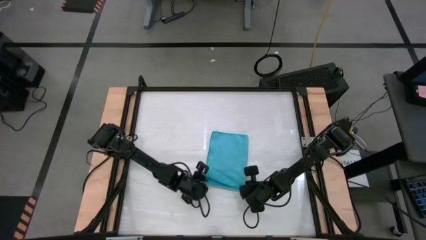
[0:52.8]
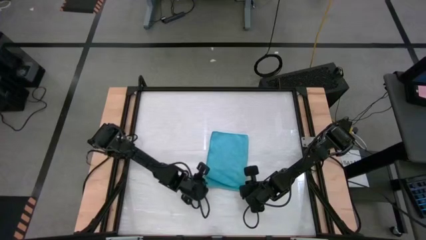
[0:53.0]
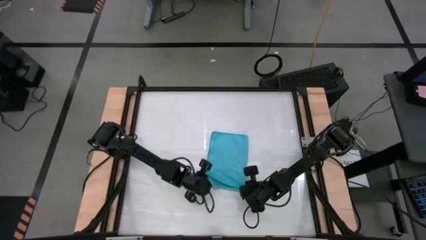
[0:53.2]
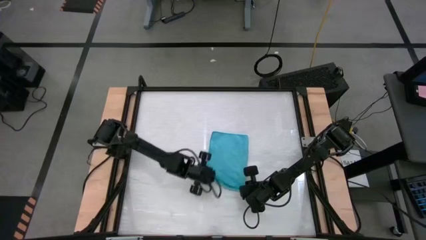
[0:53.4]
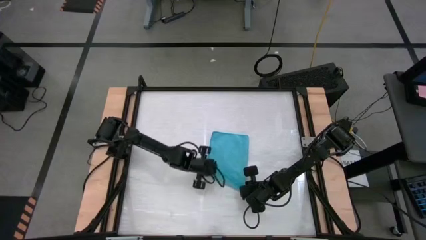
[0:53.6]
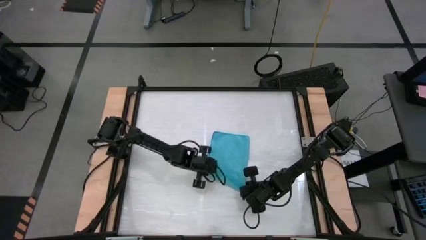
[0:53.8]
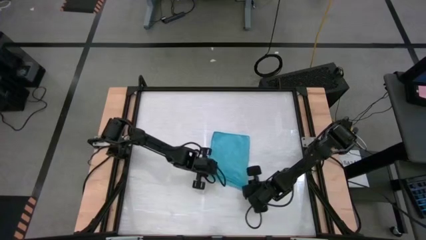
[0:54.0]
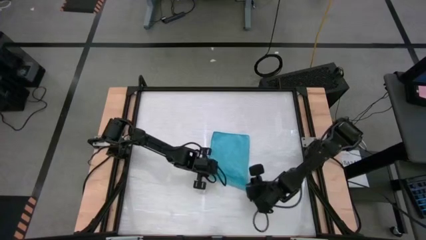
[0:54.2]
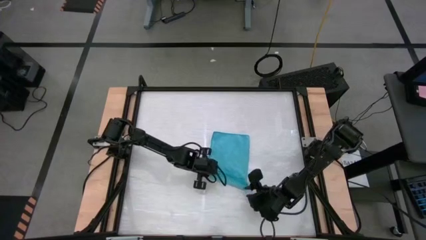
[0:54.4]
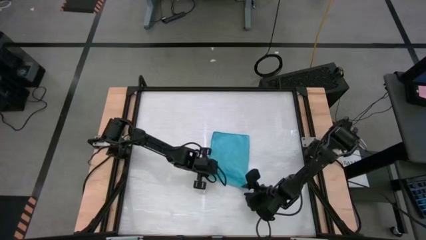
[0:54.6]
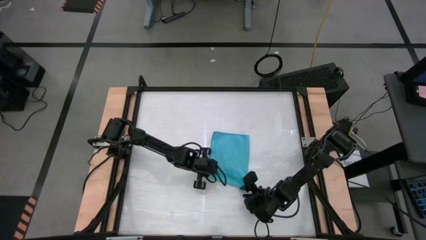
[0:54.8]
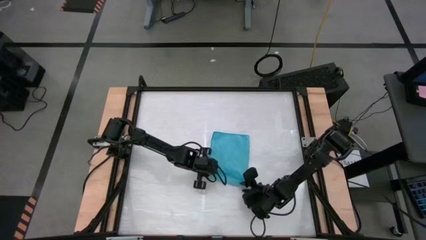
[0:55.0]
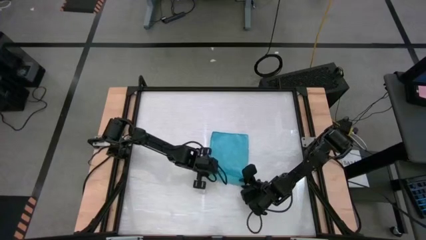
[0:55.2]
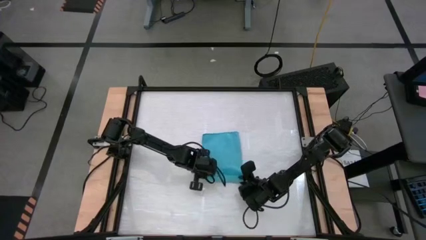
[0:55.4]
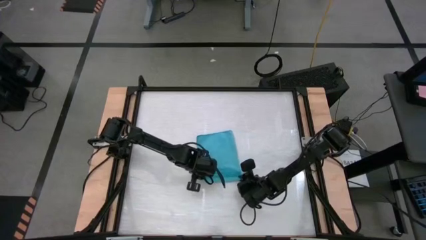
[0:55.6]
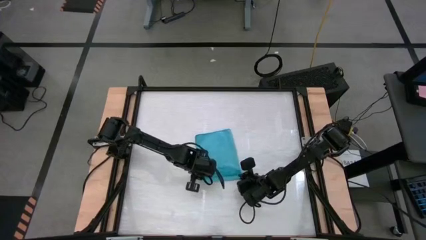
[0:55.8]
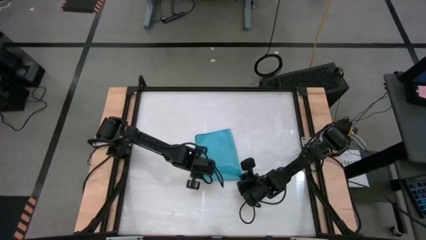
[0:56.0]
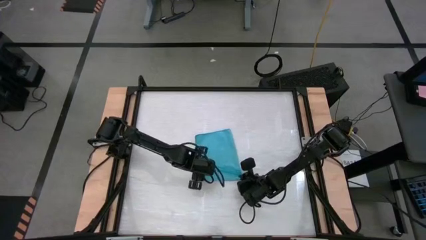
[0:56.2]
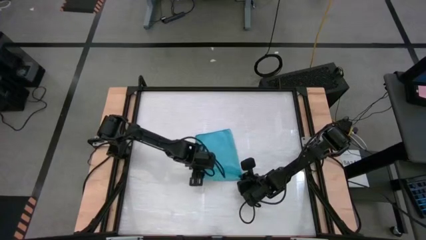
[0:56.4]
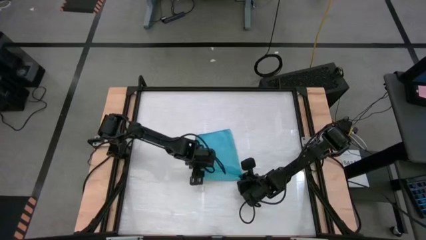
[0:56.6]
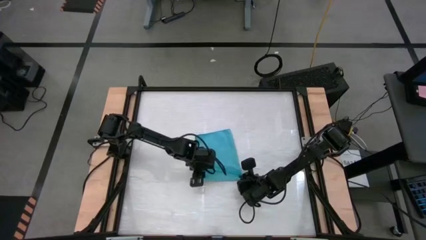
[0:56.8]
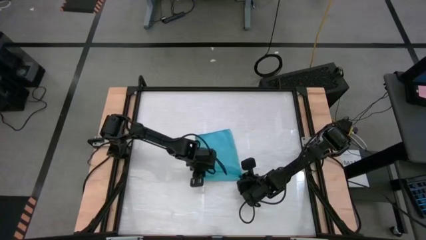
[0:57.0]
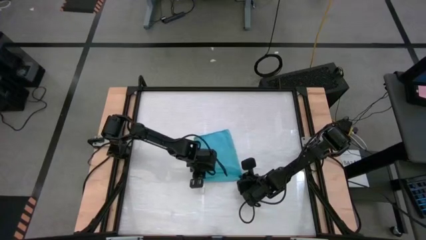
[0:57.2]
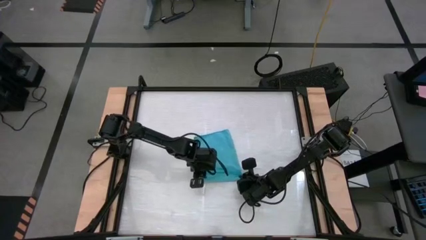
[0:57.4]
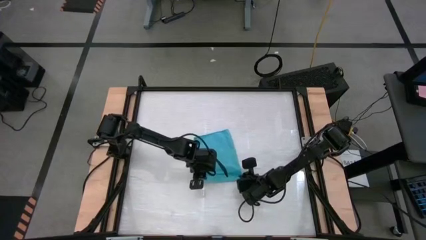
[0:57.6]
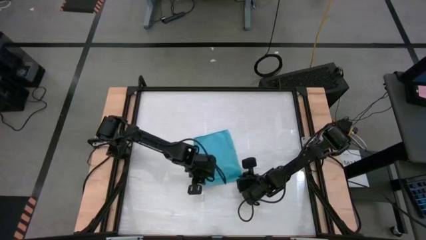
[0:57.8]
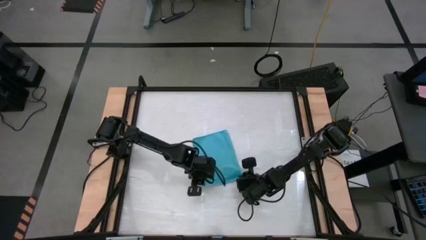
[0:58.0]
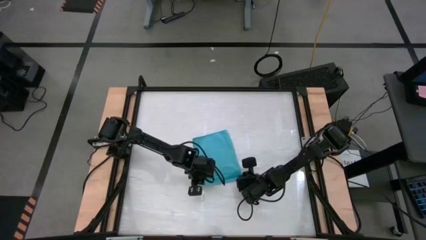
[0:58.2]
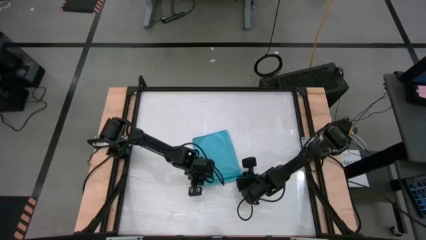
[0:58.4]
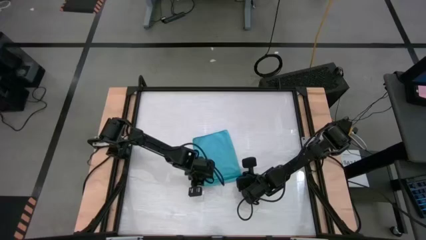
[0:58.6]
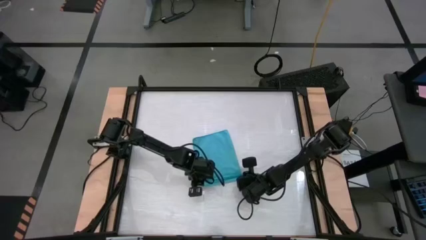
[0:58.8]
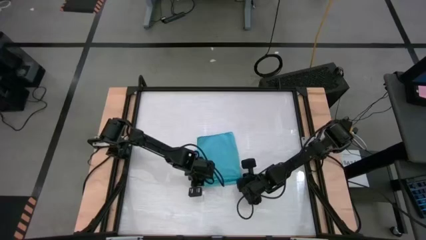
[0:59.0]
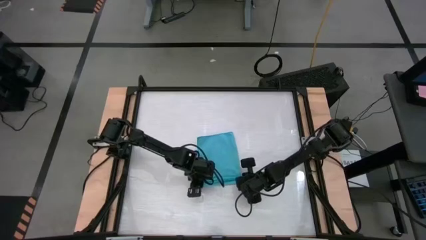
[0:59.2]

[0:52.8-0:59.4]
Task: Roll towel
Roll the blue microfiber towel

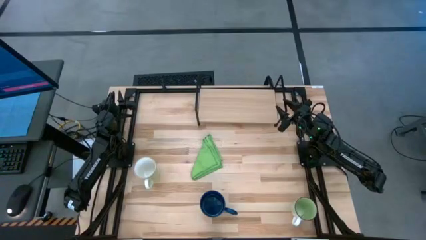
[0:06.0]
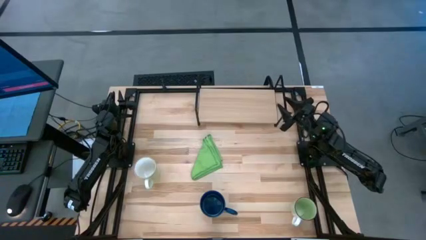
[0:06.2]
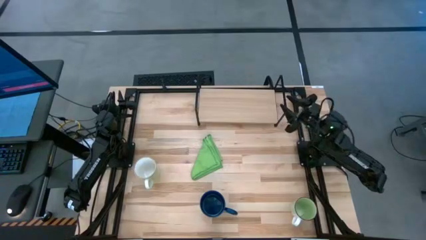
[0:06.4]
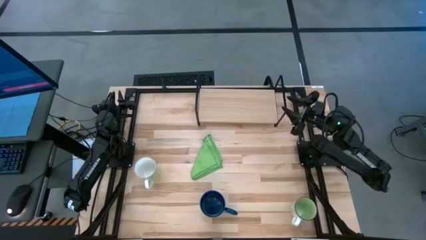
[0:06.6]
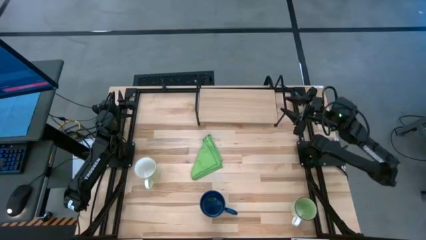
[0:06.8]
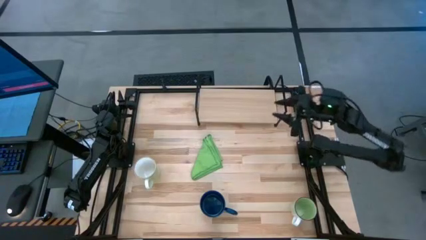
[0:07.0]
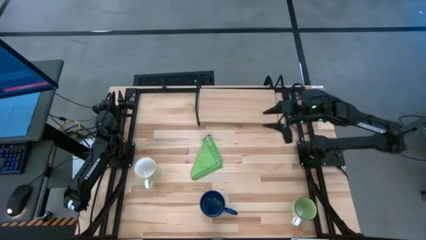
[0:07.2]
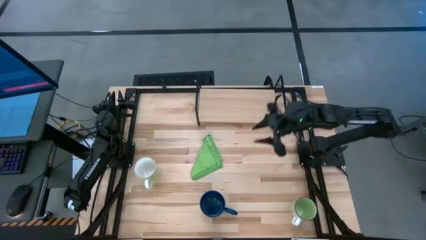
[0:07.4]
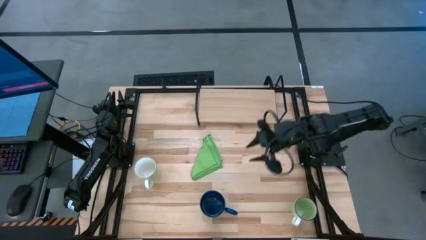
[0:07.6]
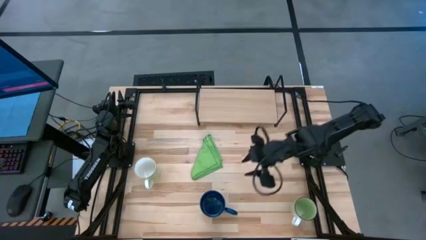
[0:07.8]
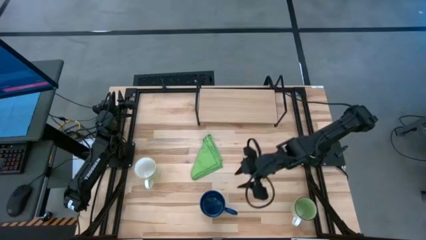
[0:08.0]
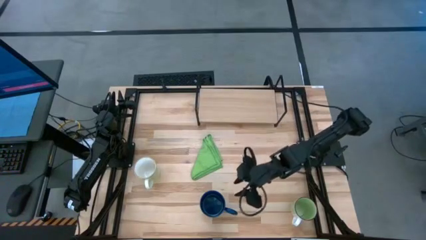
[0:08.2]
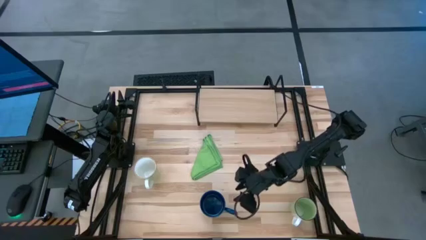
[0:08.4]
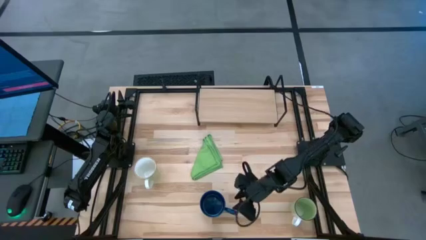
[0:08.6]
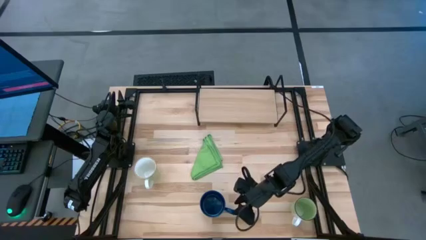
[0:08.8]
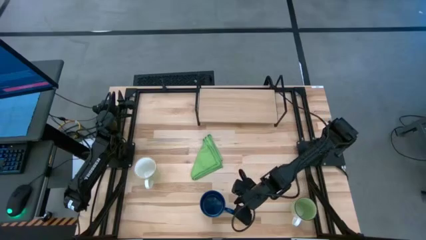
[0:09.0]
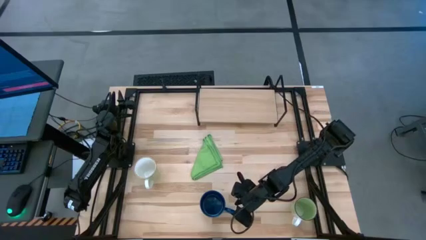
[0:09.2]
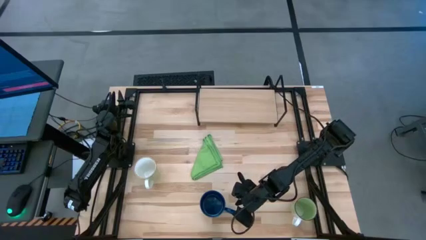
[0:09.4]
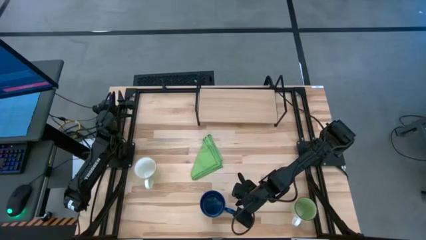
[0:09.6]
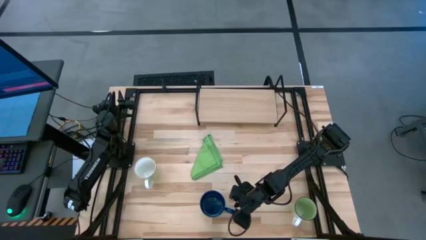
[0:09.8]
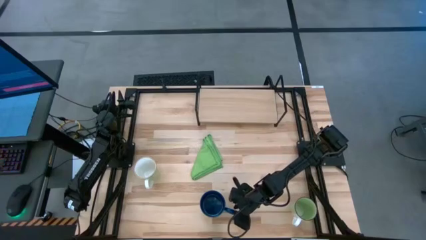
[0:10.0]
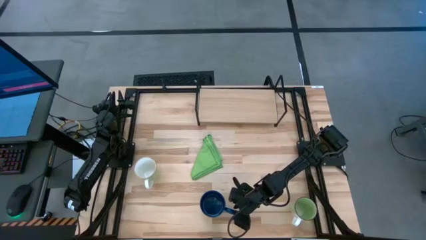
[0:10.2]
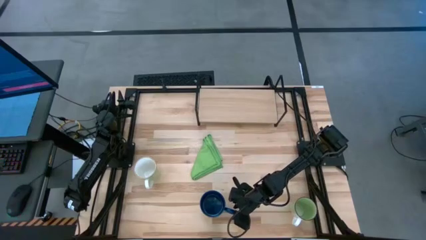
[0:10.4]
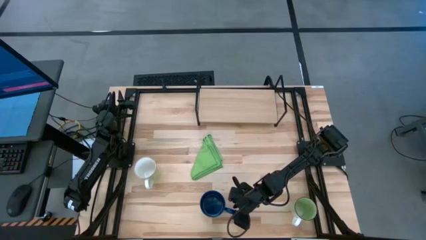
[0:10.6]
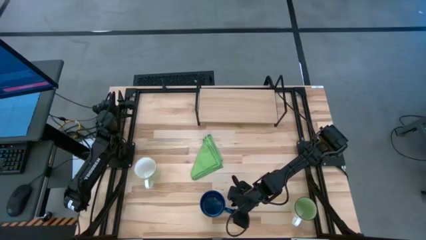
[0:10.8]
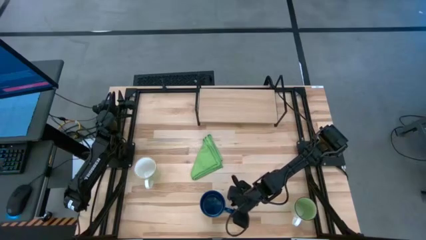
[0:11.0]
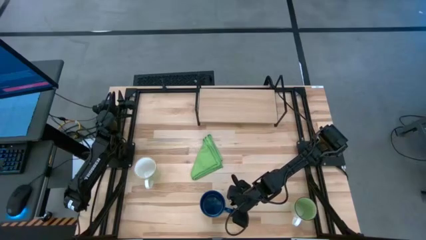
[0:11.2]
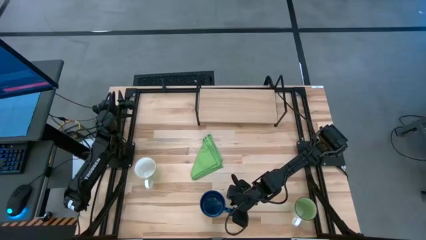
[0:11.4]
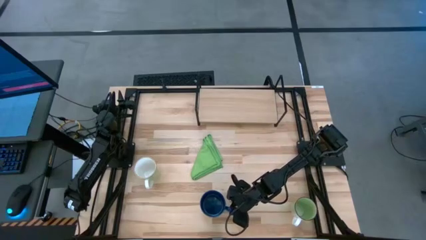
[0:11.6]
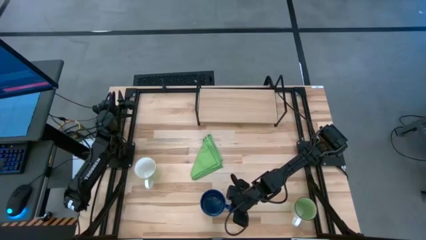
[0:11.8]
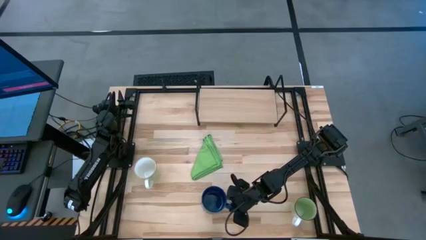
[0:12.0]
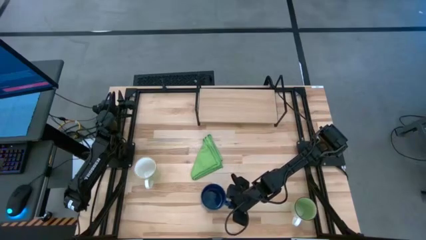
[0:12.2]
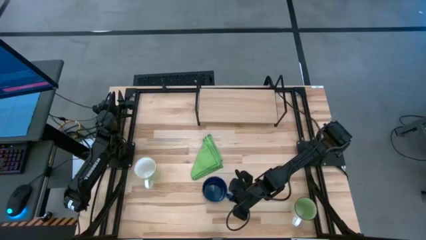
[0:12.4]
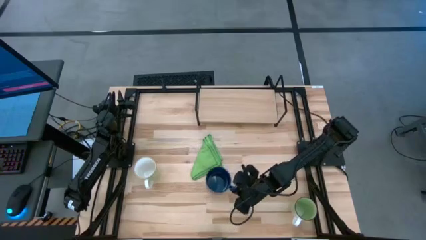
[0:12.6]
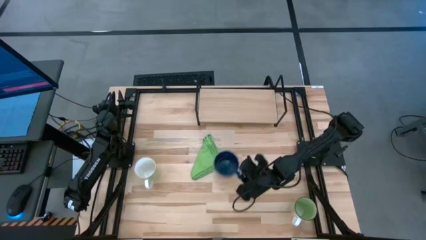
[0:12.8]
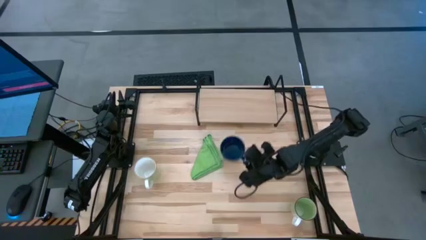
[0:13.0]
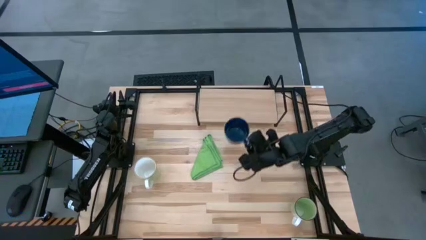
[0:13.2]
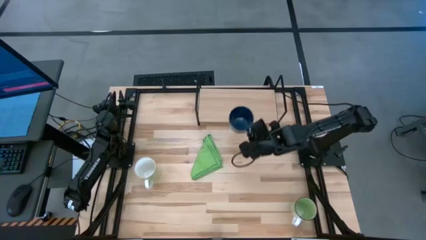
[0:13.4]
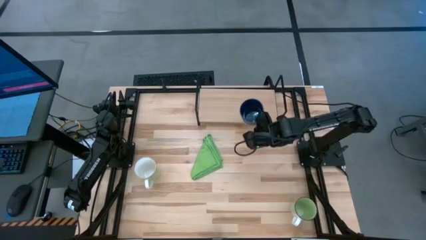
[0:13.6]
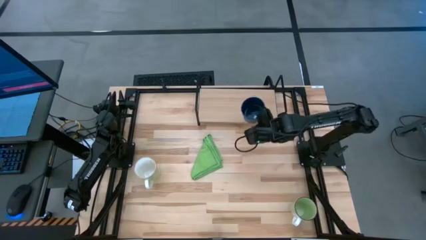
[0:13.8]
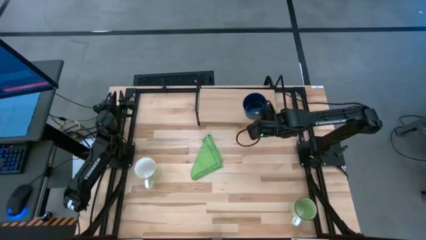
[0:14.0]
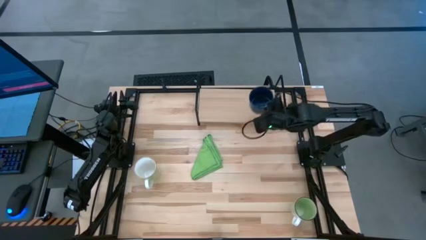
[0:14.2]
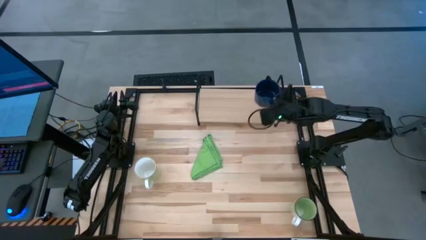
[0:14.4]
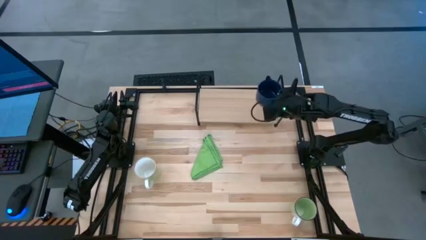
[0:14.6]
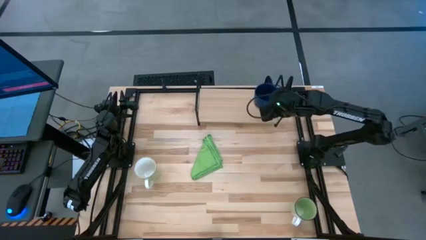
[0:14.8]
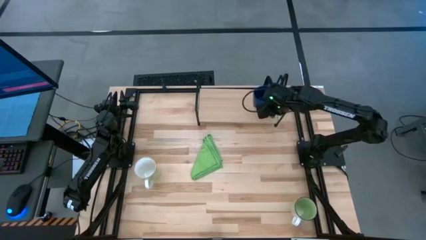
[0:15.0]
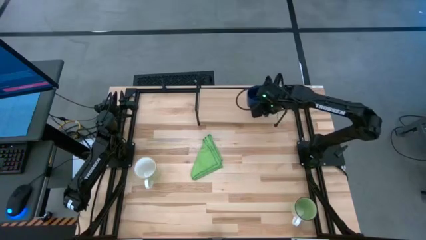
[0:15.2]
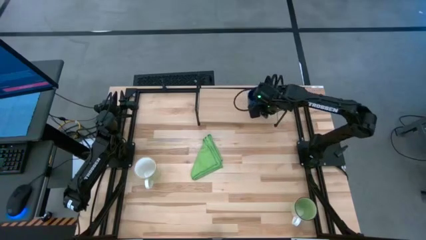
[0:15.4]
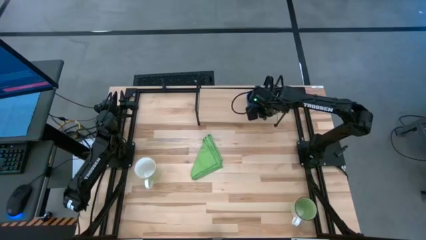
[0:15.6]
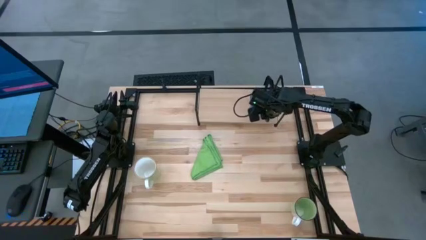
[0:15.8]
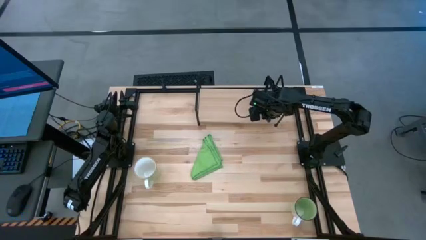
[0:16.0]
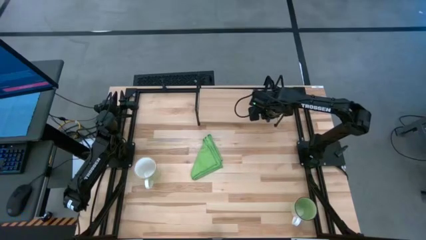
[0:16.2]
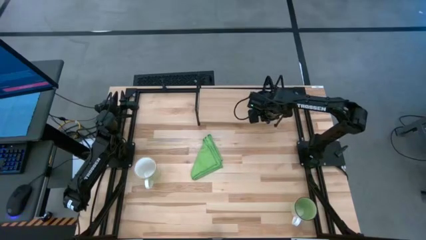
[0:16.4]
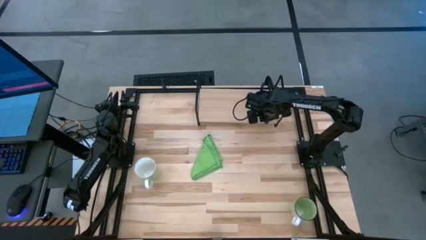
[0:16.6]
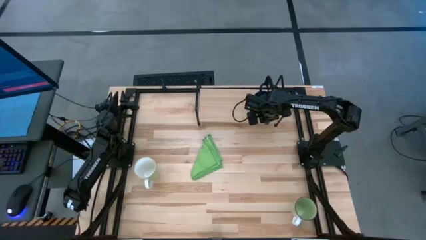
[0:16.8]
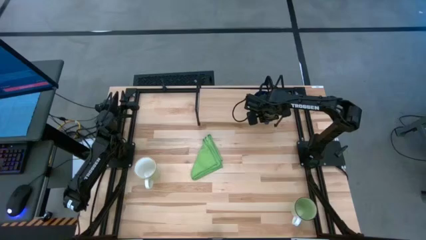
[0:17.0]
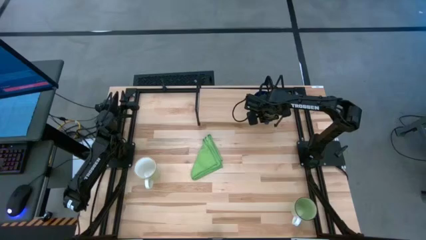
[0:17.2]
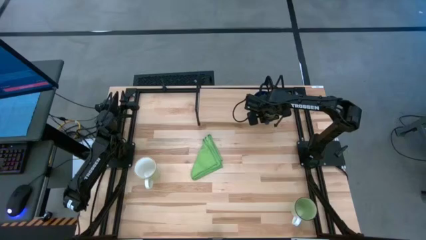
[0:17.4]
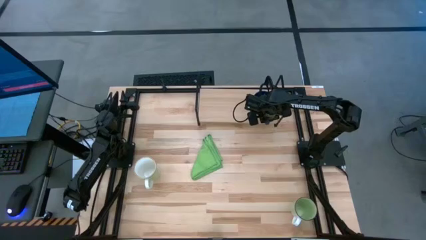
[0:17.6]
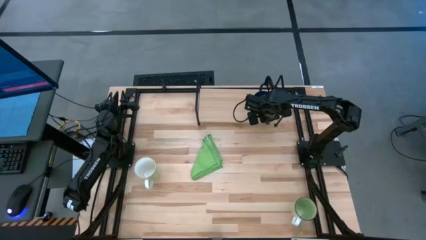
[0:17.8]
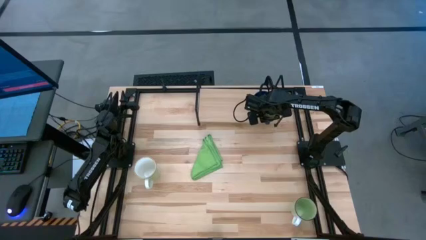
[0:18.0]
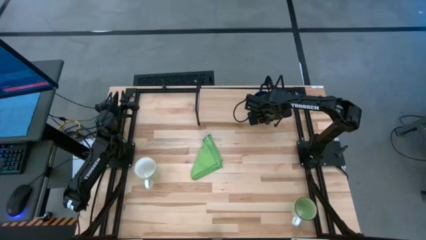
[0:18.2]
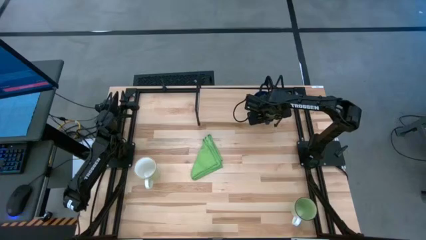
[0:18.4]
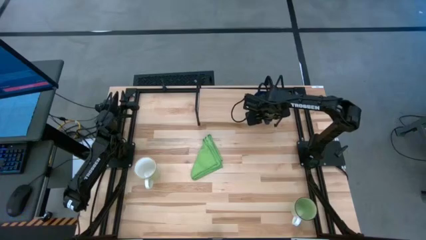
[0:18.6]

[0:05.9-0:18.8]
Task: Stack small to large cups/mugs on shelf
Put the blue mug on the shelf
